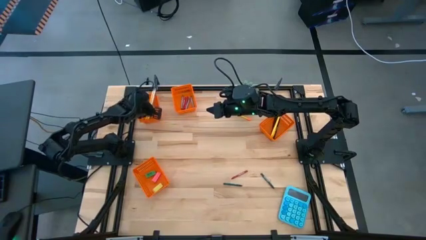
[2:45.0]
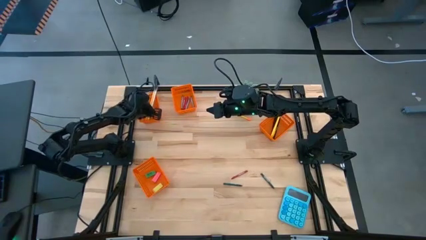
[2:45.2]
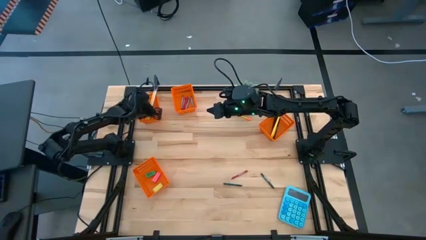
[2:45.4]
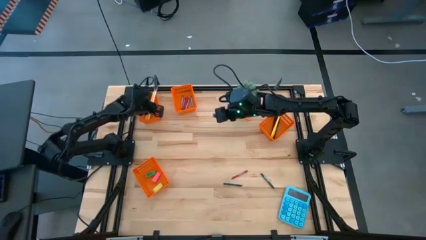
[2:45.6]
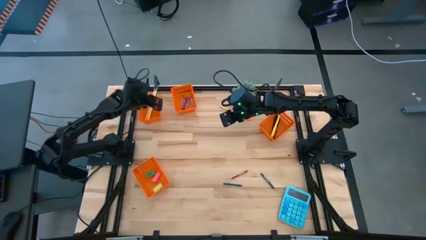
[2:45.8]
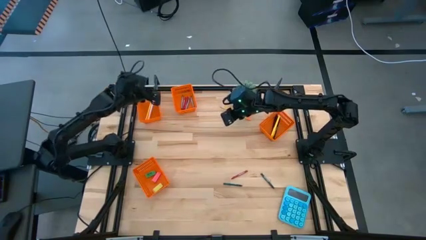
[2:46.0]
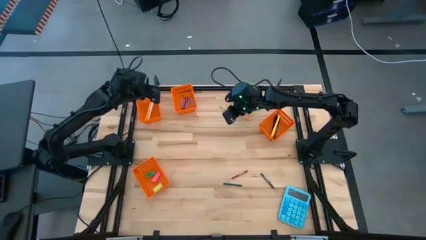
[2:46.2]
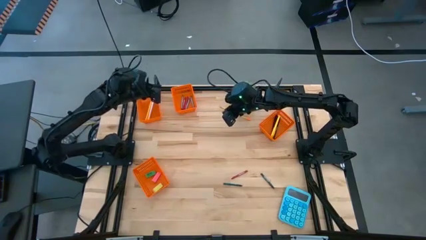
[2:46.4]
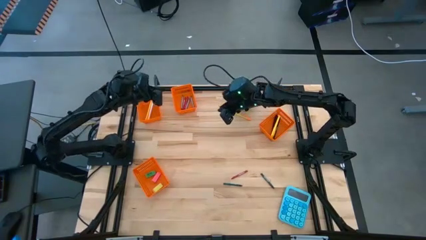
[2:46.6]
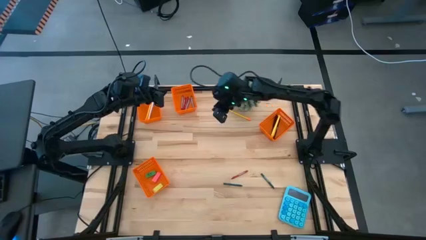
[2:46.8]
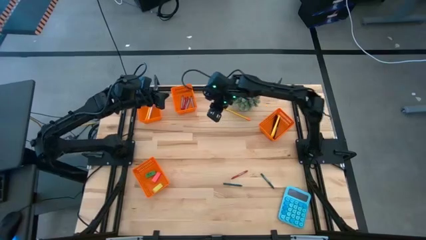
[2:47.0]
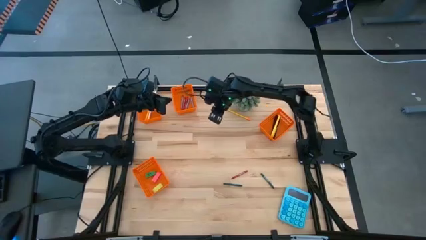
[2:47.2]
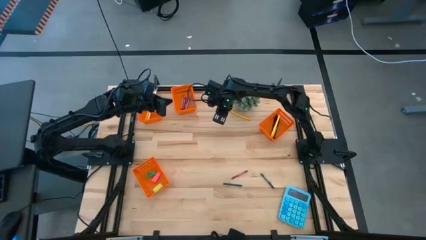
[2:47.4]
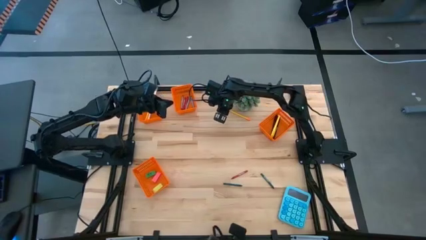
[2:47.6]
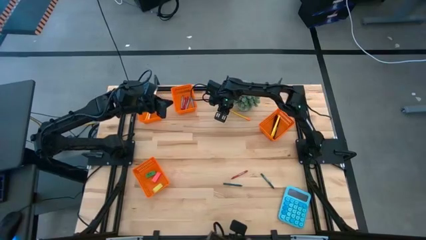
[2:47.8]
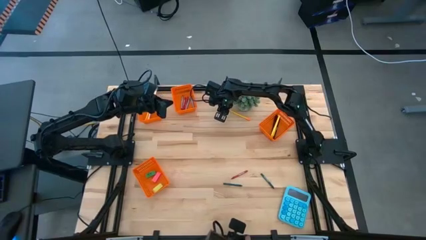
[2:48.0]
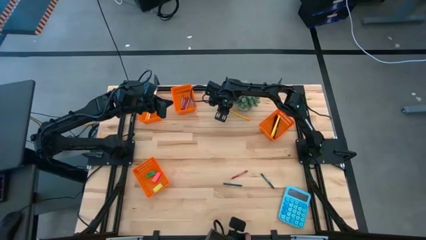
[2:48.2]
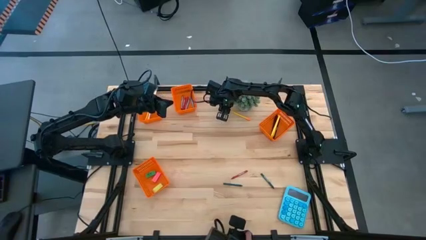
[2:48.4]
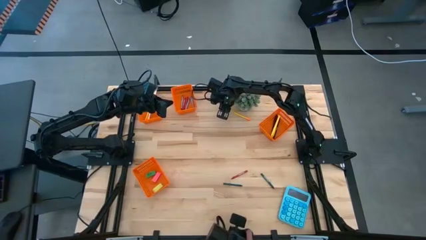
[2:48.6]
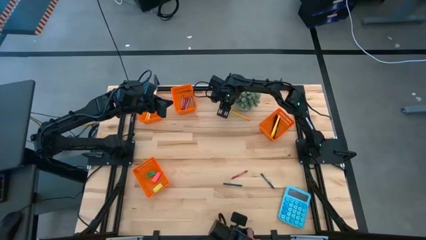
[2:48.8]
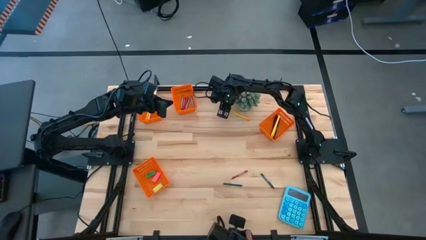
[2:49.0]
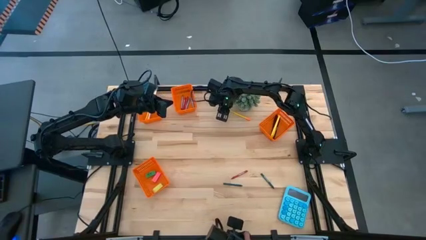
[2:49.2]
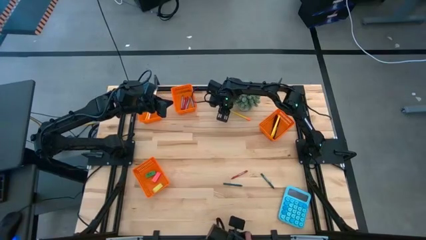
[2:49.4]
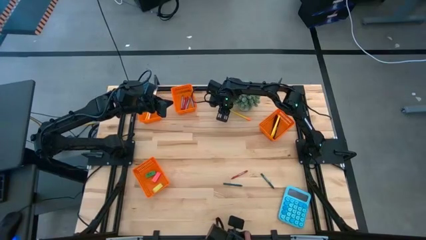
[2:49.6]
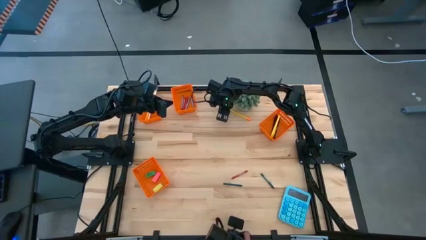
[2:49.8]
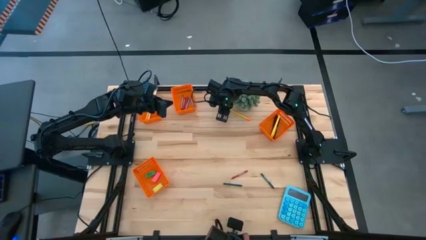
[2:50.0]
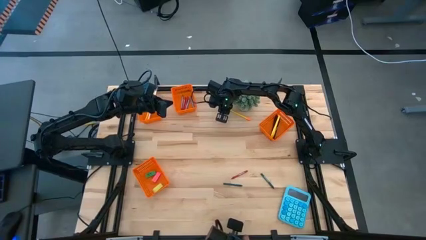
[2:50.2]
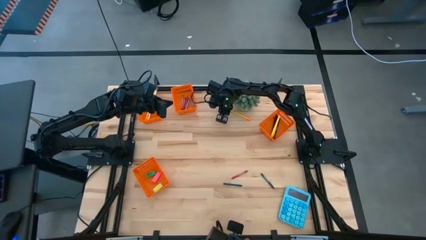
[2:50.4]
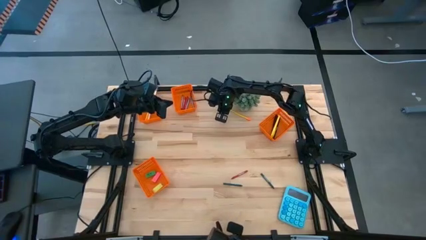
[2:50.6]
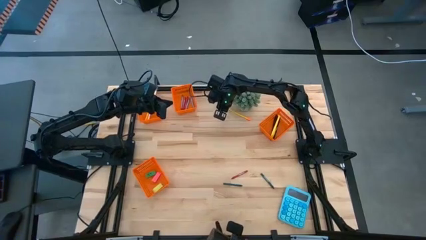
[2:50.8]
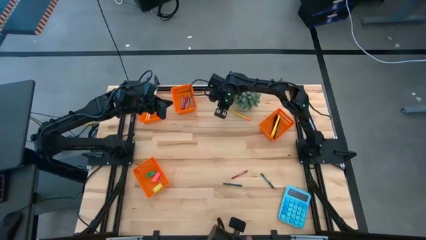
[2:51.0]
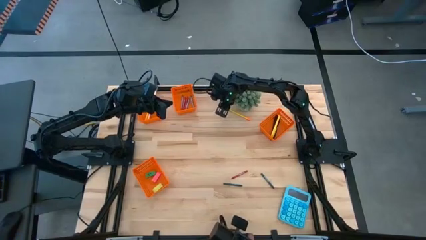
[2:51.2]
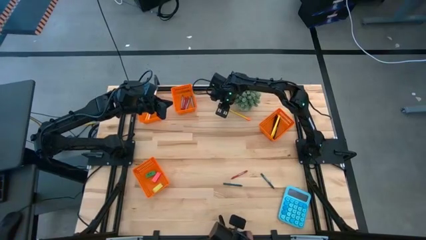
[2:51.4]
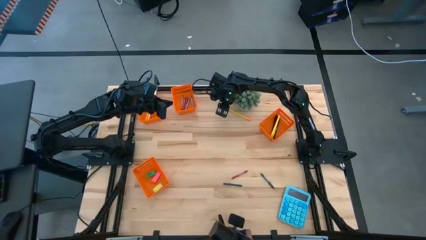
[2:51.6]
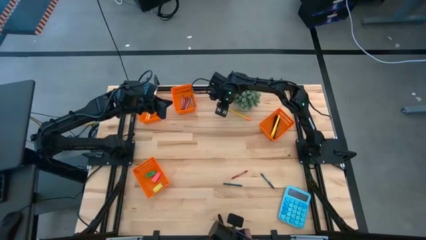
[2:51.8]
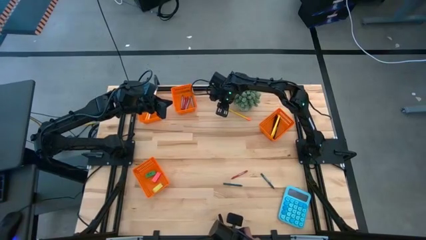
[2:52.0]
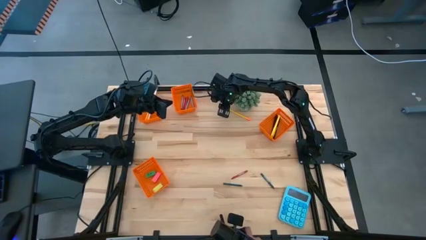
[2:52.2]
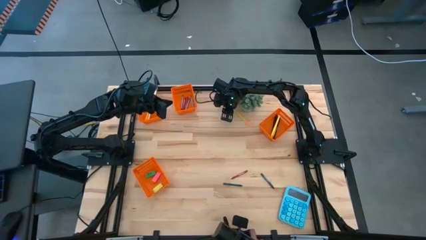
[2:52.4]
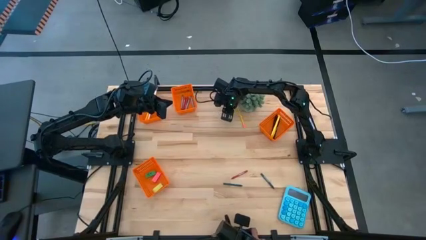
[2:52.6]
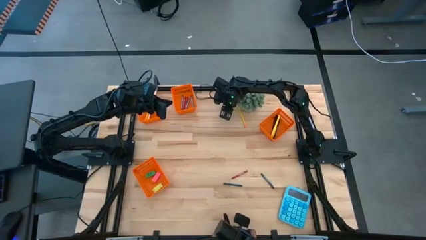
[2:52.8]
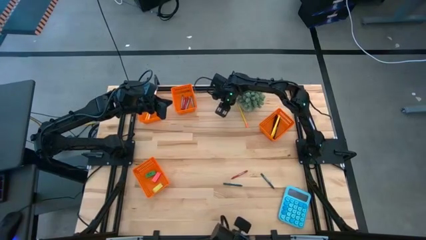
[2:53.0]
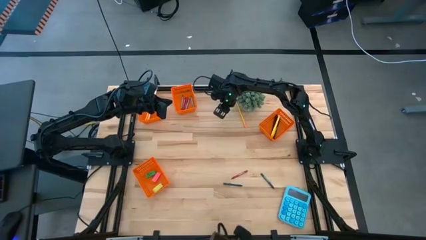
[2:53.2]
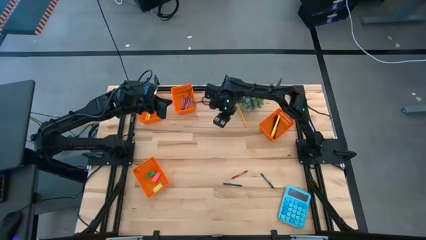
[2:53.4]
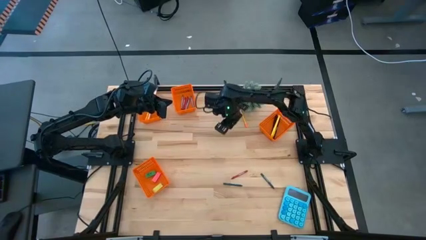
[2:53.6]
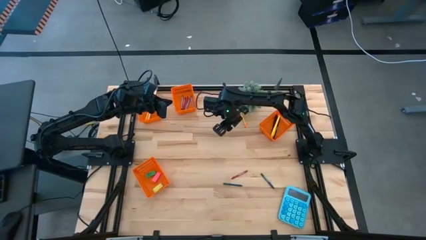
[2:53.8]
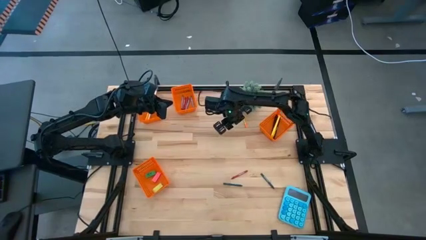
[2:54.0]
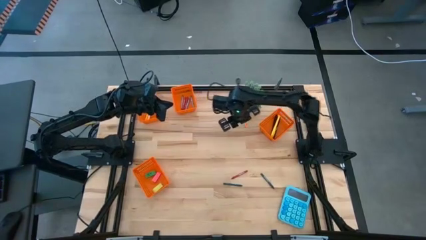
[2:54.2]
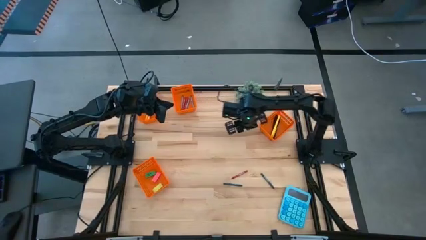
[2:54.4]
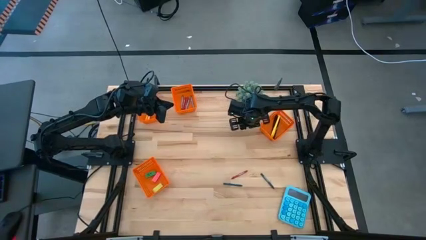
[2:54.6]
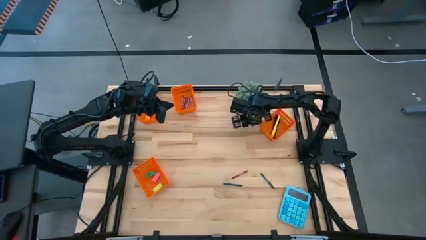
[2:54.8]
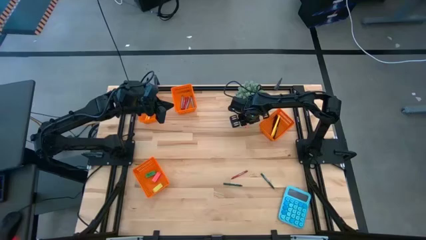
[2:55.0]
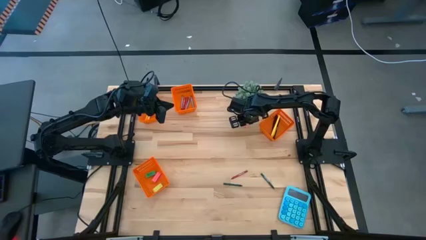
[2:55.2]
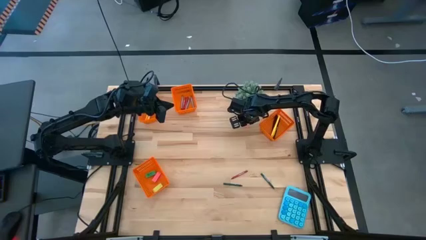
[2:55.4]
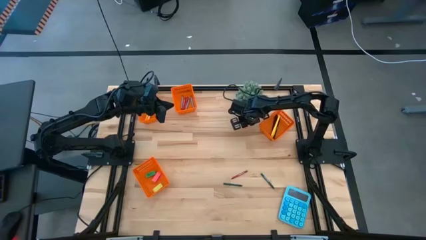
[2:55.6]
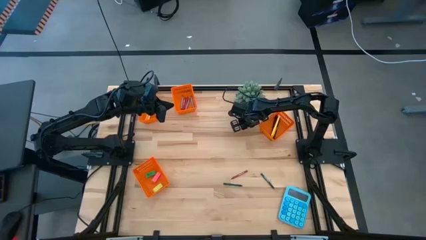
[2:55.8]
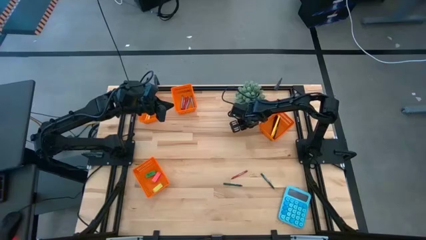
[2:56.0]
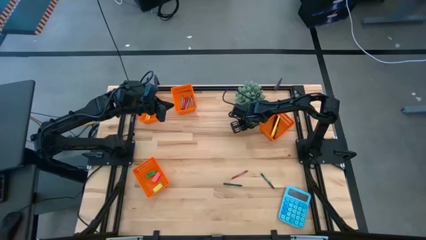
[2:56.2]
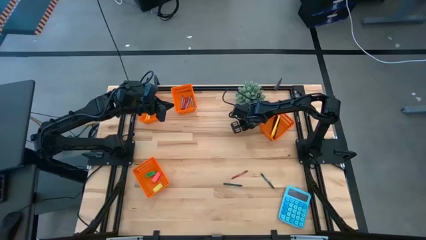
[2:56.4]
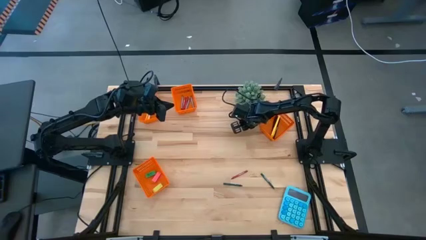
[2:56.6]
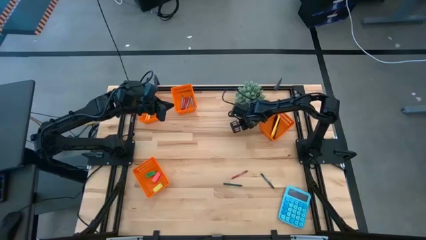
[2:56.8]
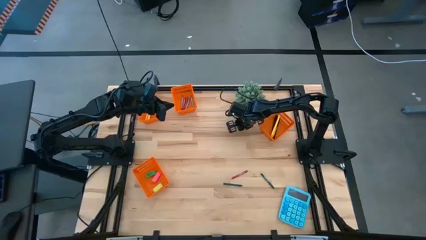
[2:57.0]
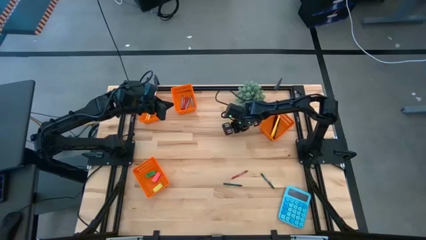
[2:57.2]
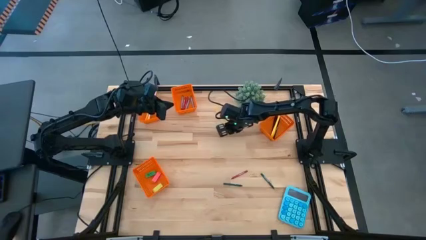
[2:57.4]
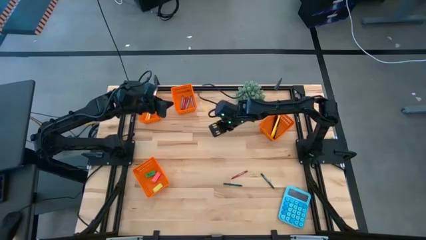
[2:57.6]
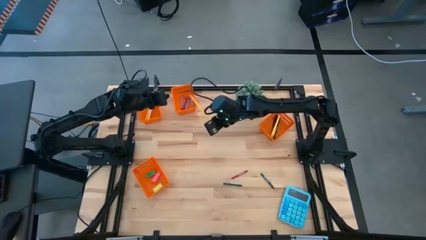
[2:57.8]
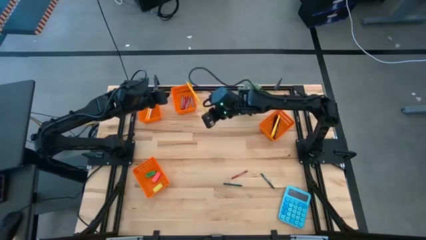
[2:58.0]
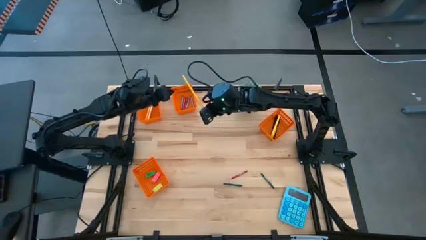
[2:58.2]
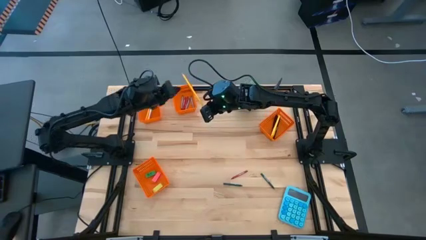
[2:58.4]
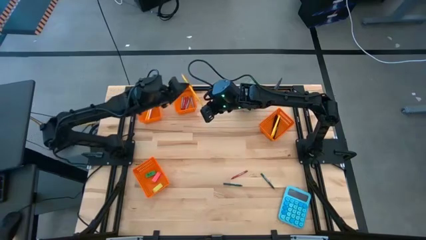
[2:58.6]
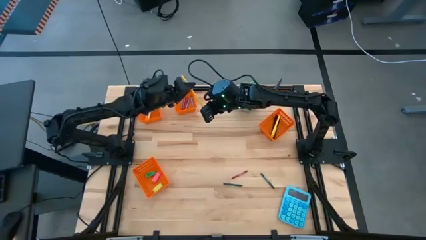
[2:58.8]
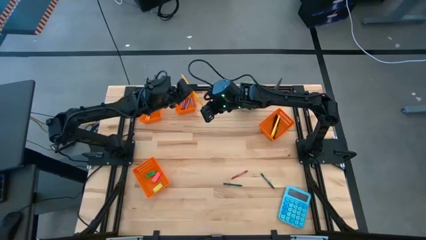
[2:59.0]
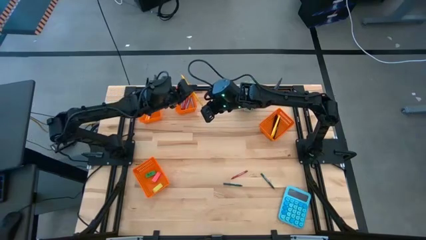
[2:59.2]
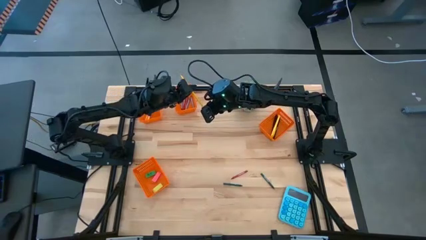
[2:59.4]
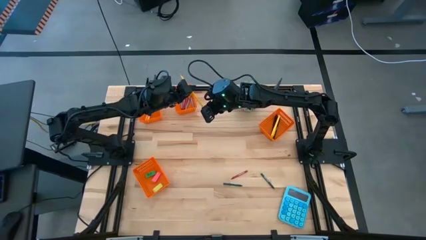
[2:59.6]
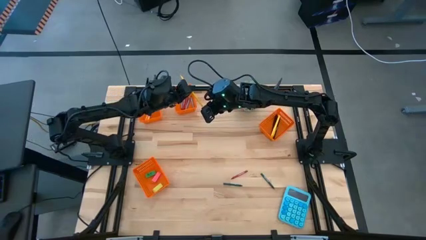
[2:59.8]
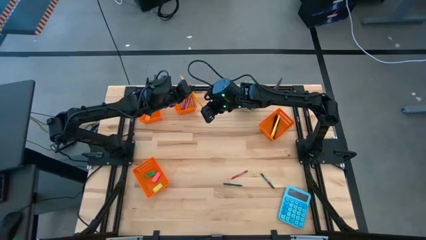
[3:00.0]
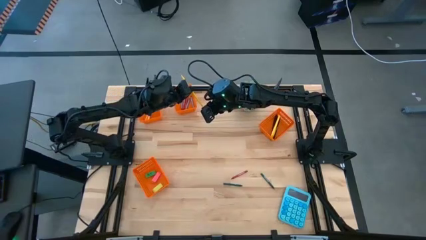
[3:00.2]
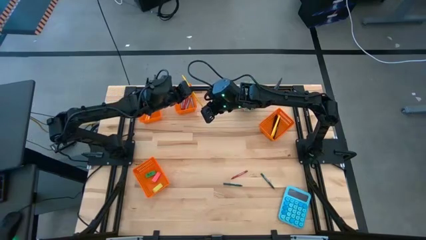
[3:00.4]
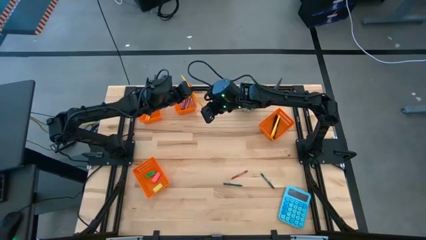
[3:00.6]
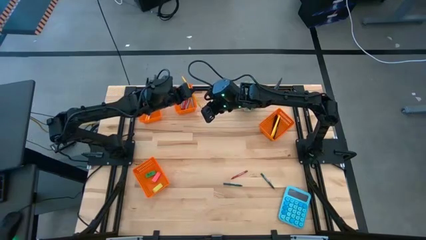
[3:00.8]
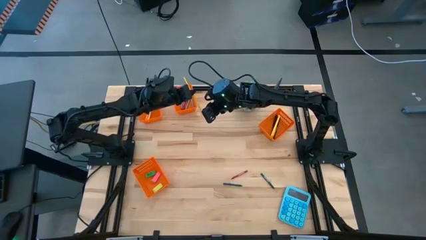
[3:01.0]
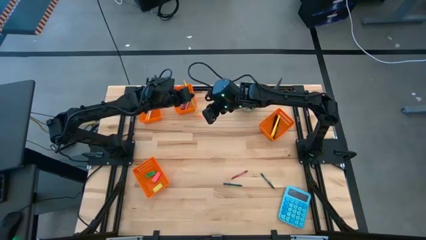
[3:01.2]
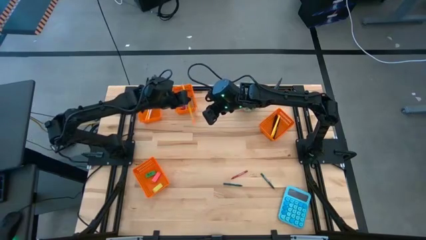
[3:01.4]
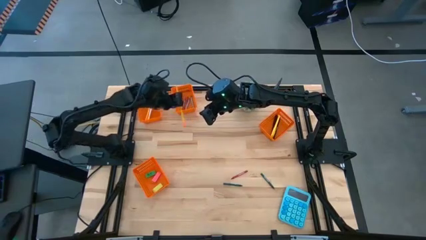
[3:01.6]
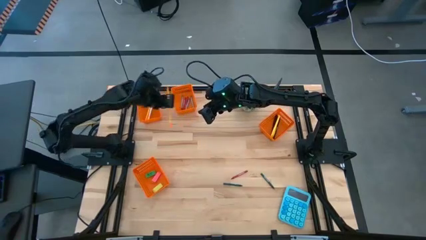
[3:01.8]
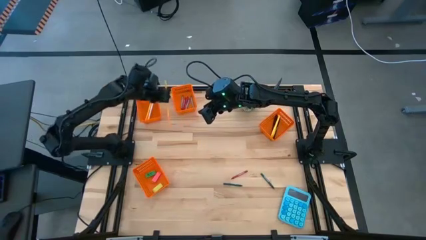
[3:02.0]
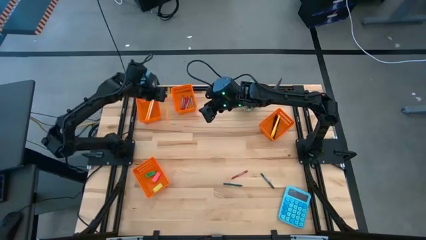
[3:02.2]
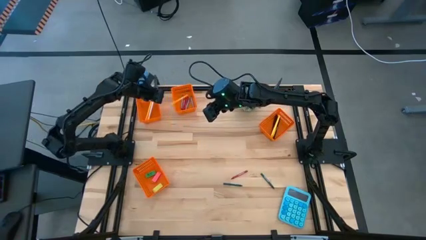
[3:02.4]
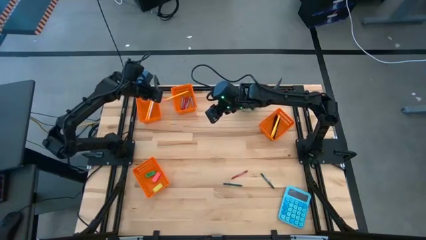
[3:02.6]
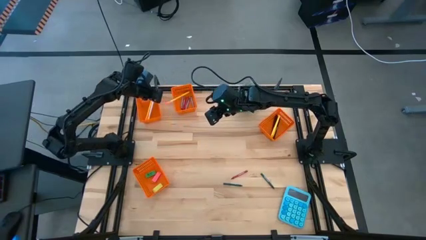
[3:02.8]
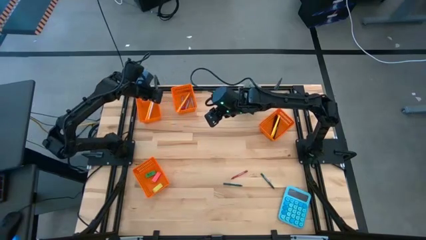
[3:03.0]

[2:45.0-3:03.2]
Task: Sort crayons/erasers/pens/pencils in bins
Put the yellow pencil into the top left orange bin
